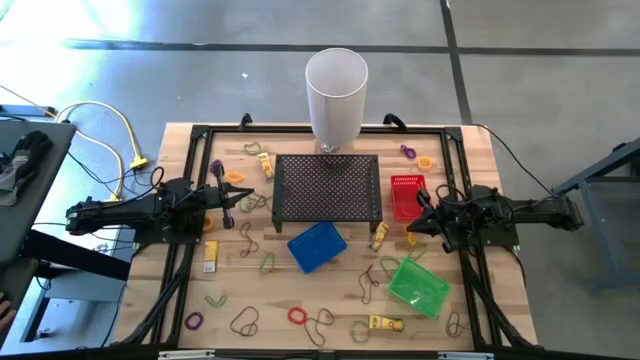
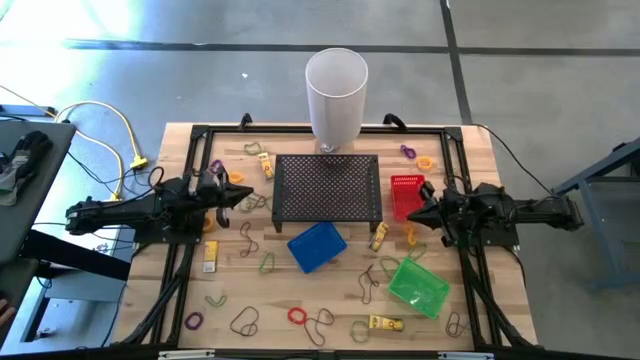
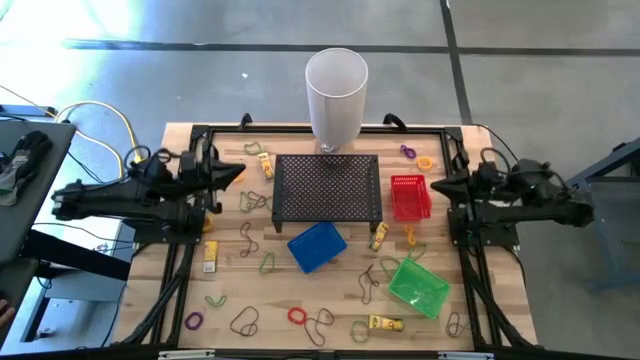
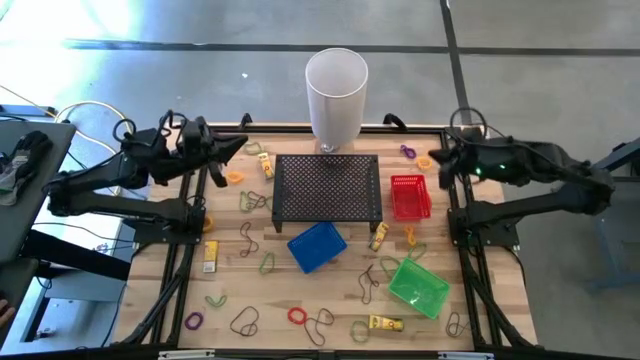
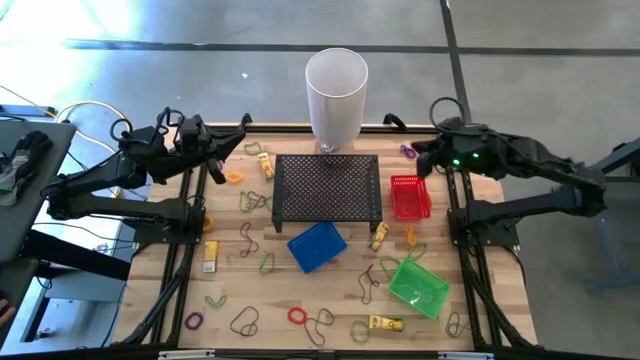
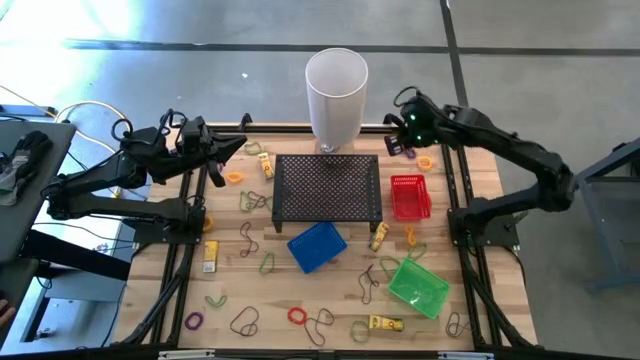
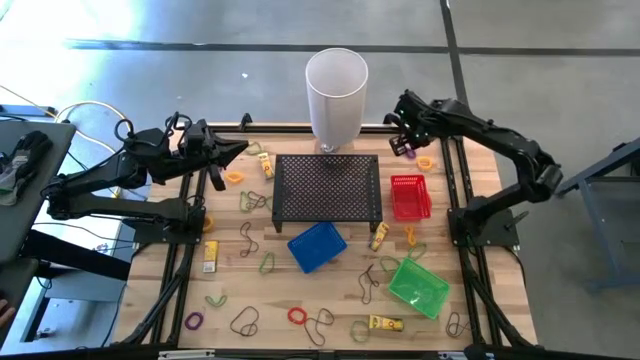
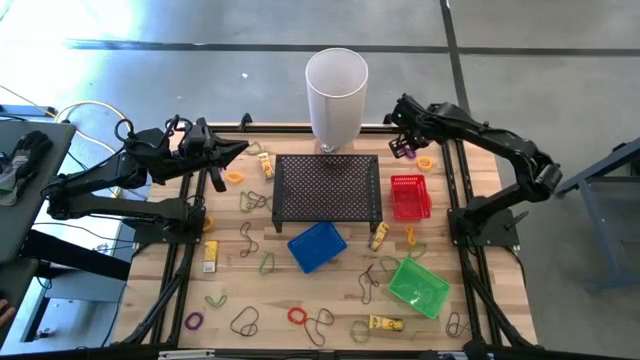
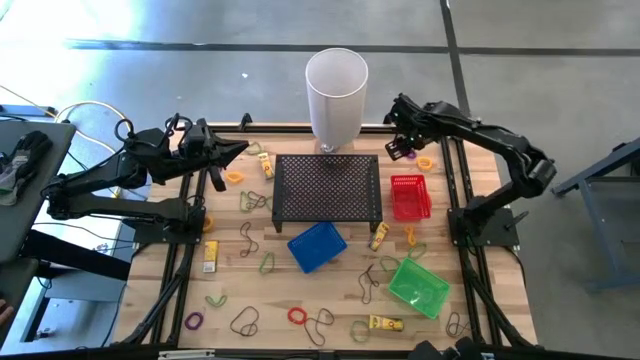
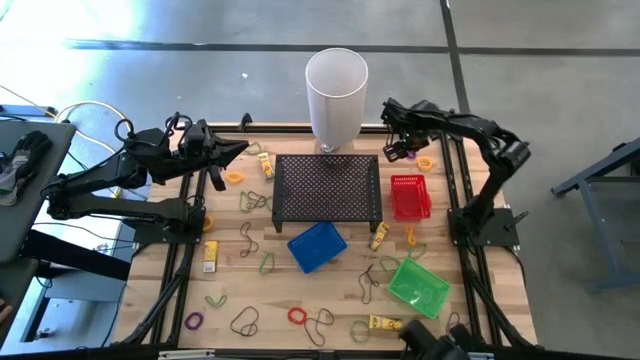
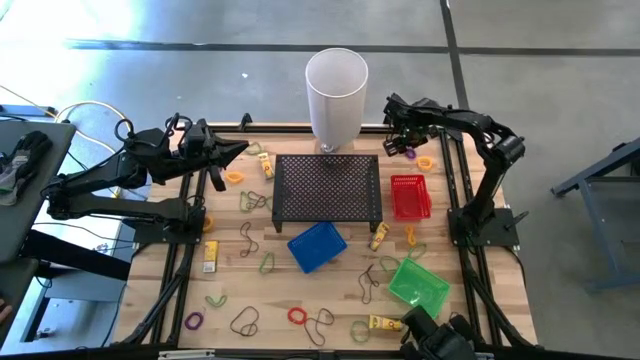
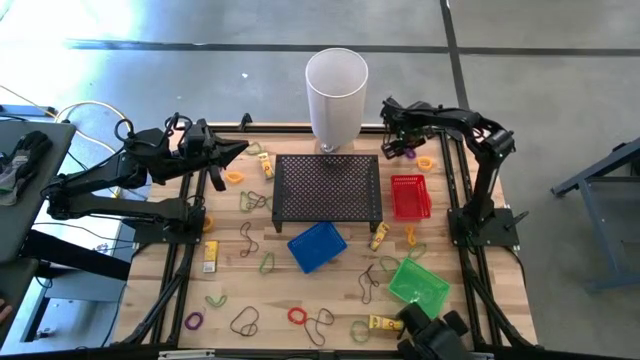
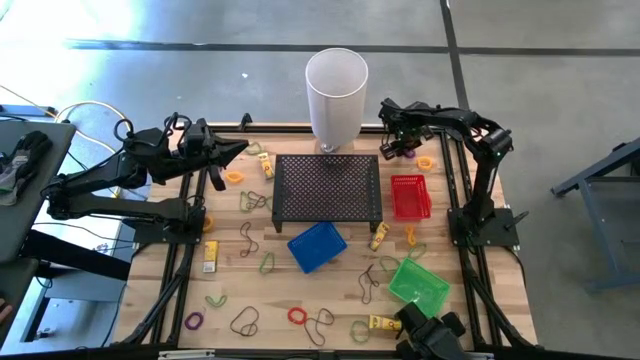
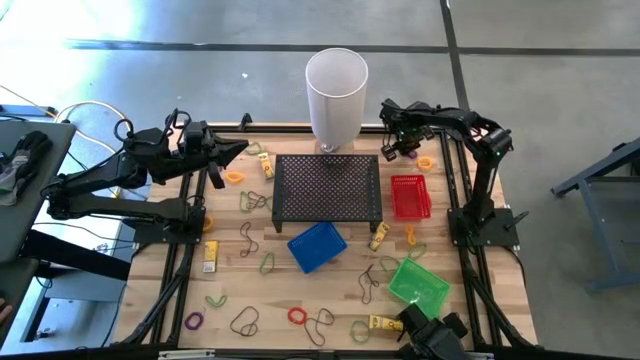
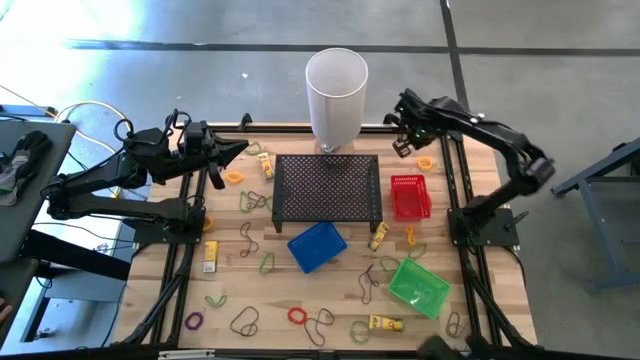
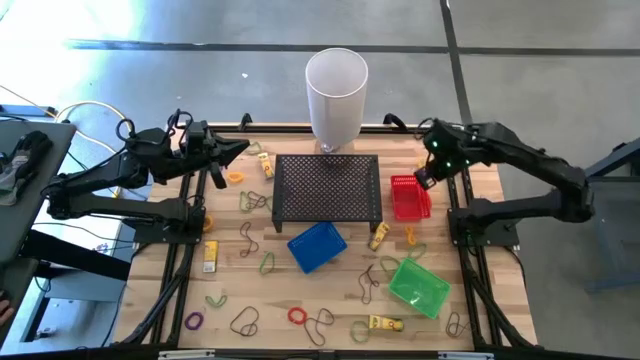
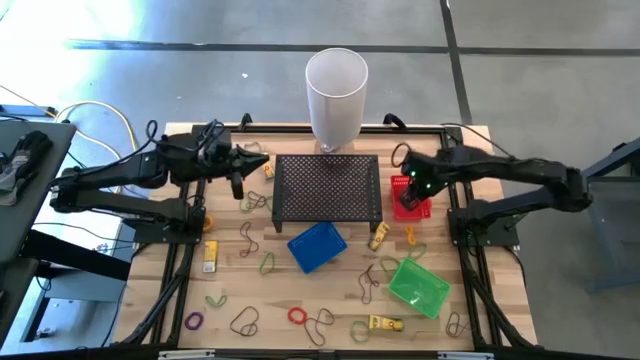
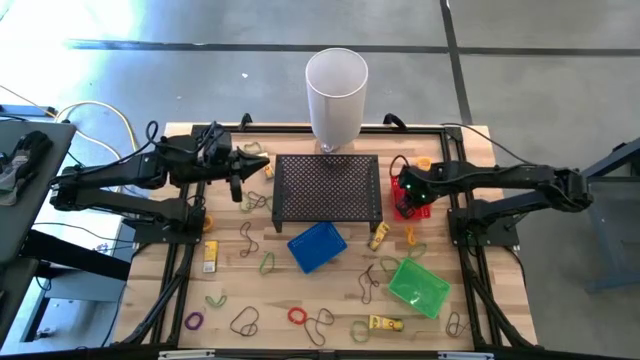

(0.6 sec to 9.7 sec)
Task: Pick & Place Office Desk Supplies
Put the violet spring keychain into the red bin

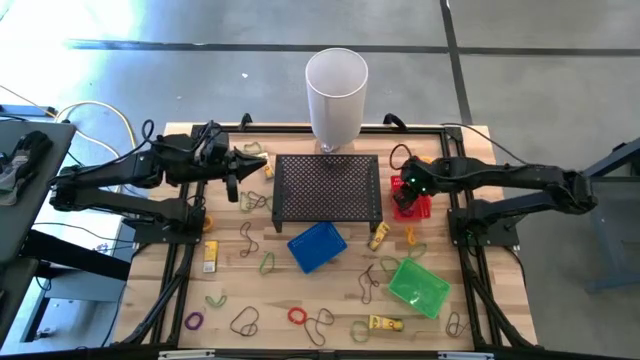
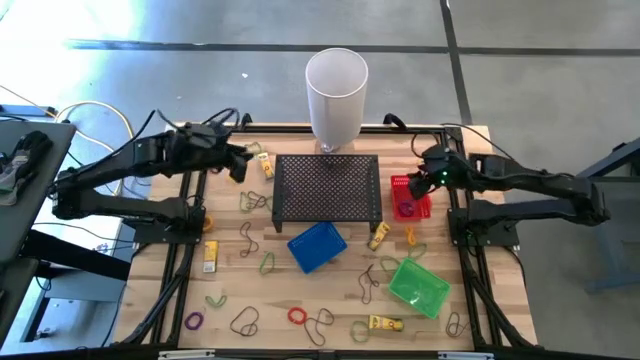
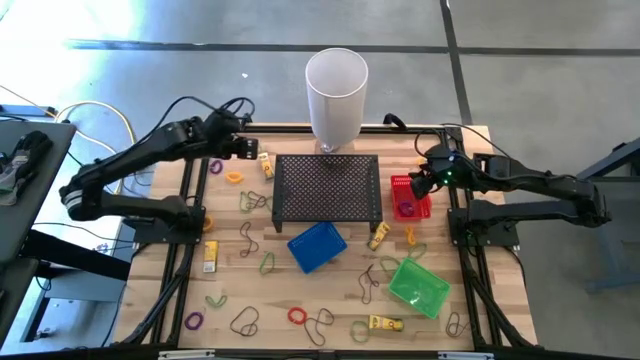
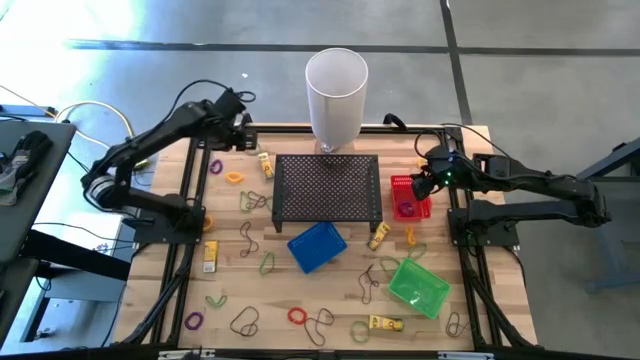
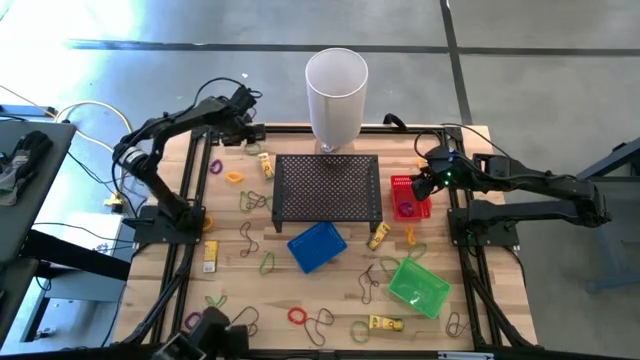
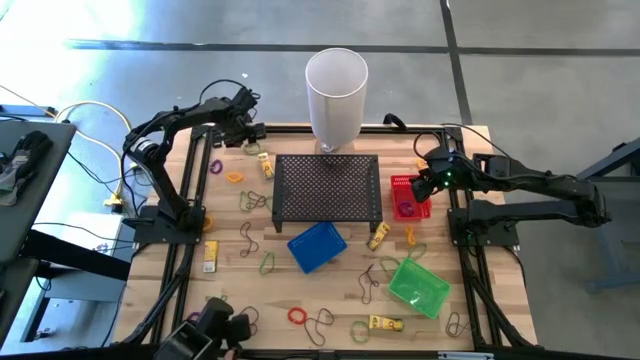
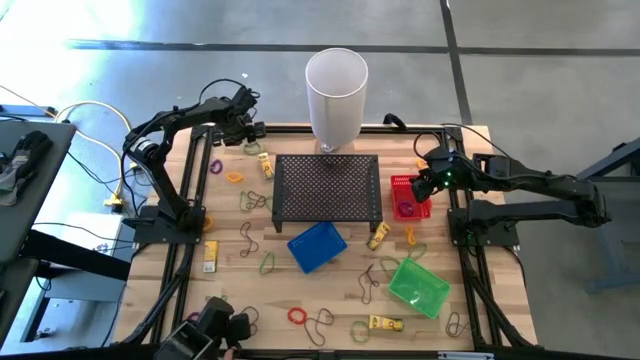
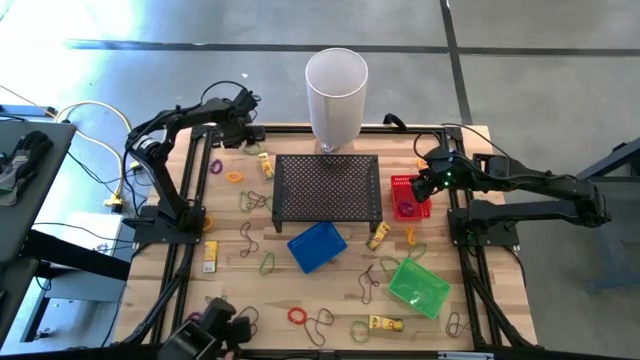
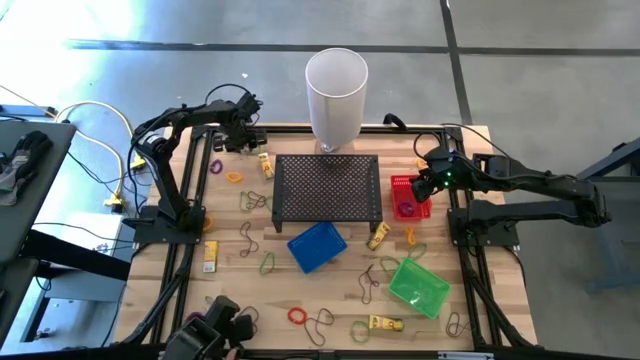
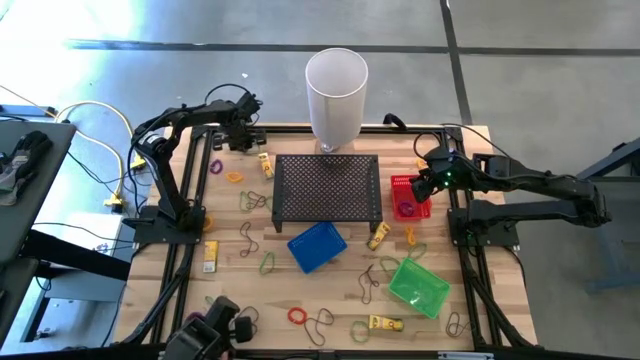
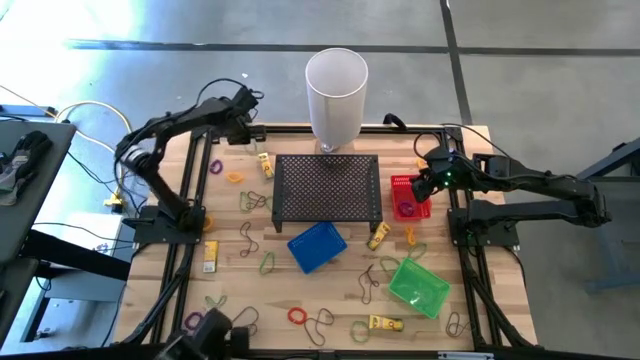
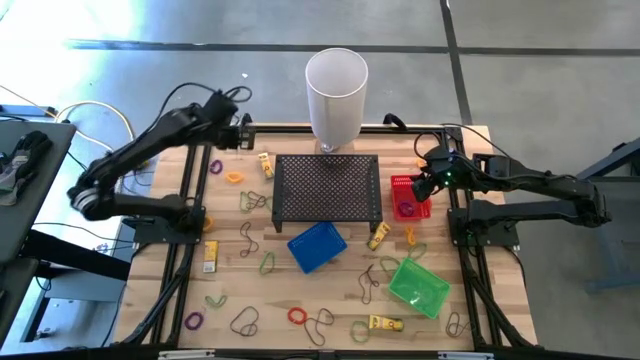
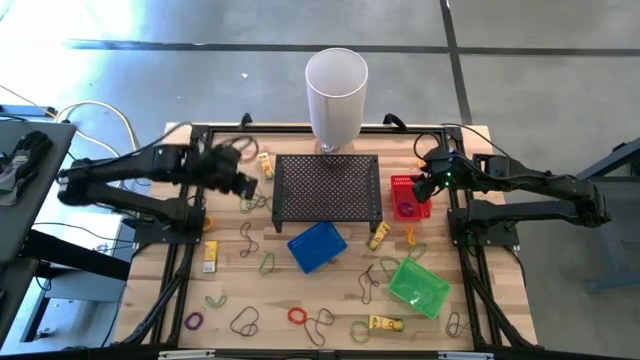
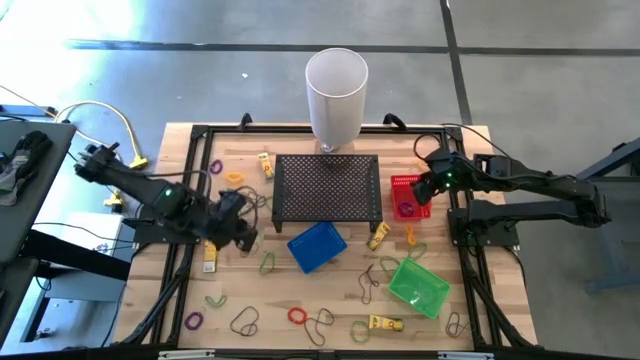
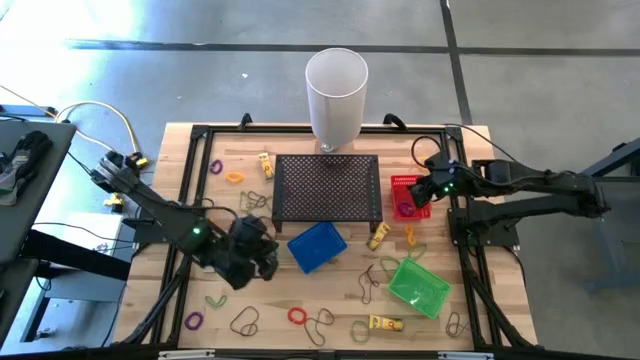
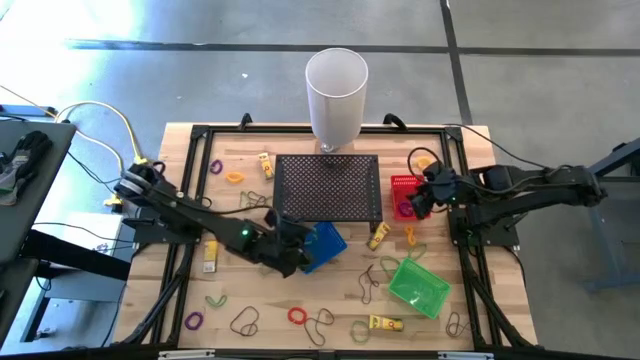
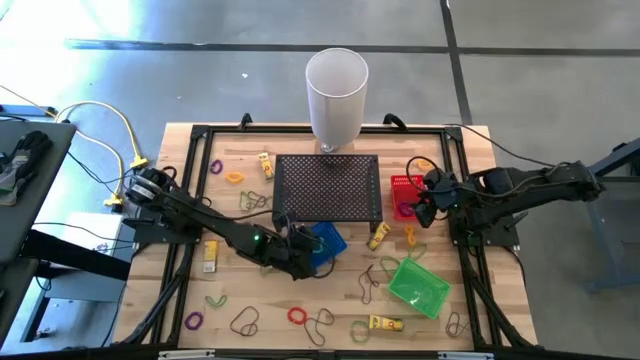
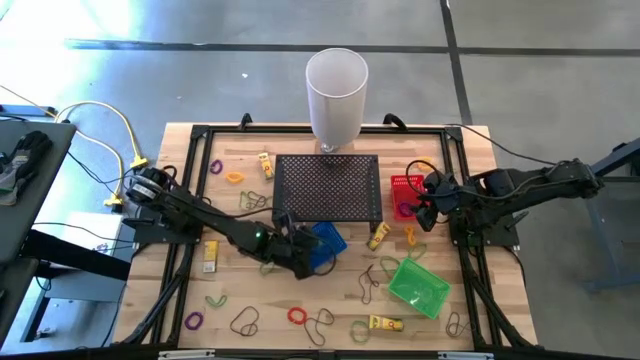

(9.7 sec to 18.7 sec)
Put the green rubber band into the blue bin

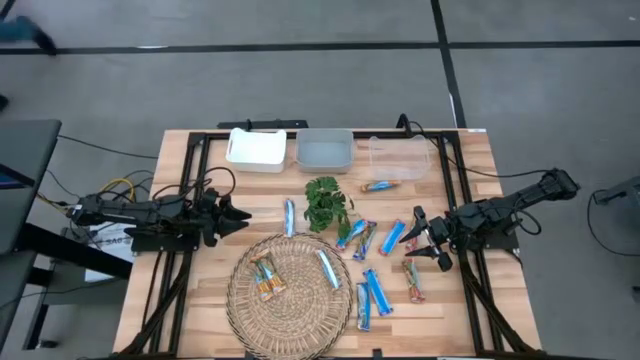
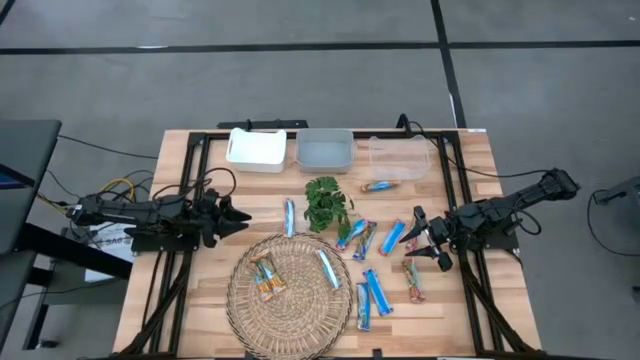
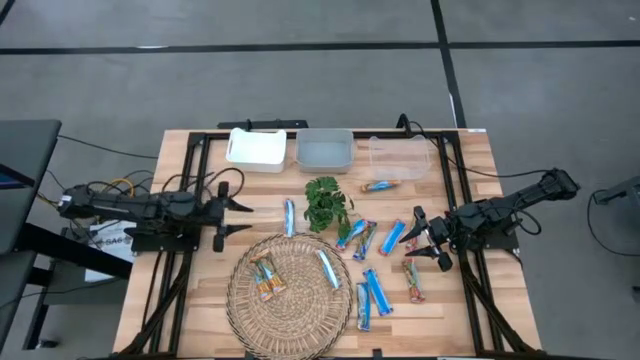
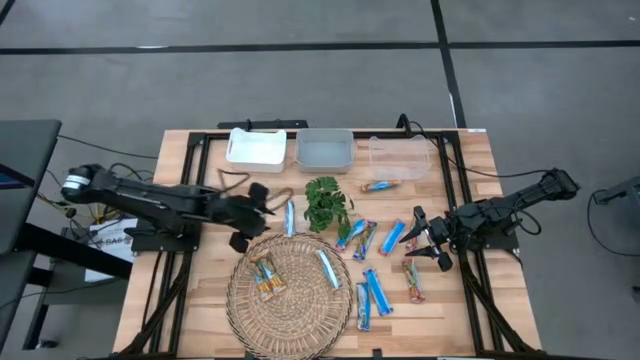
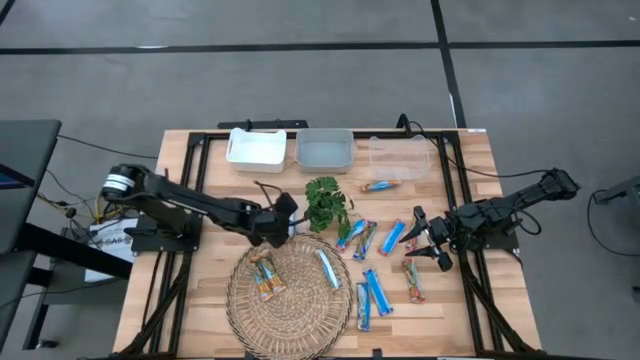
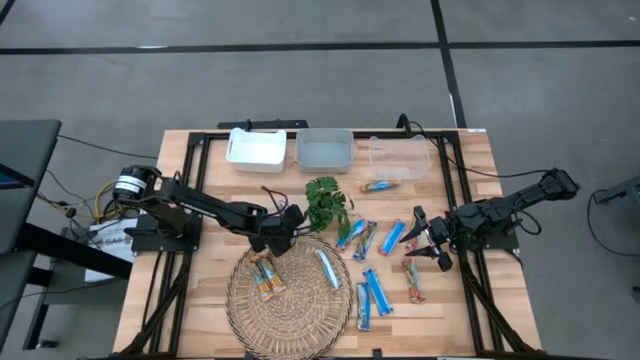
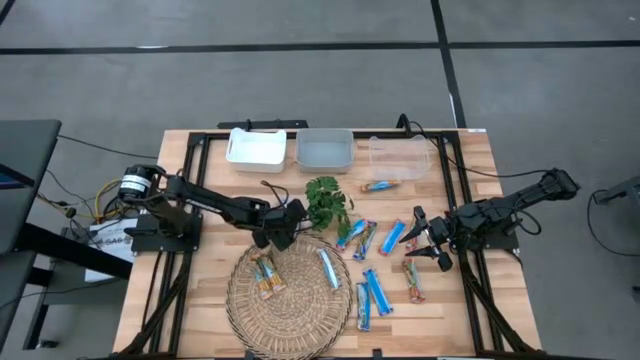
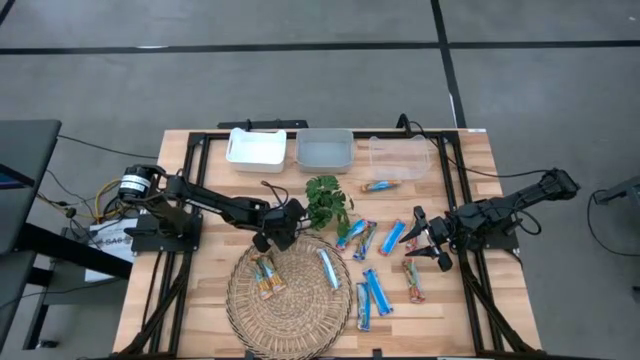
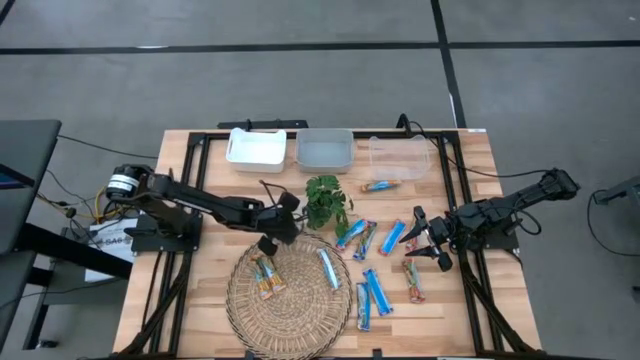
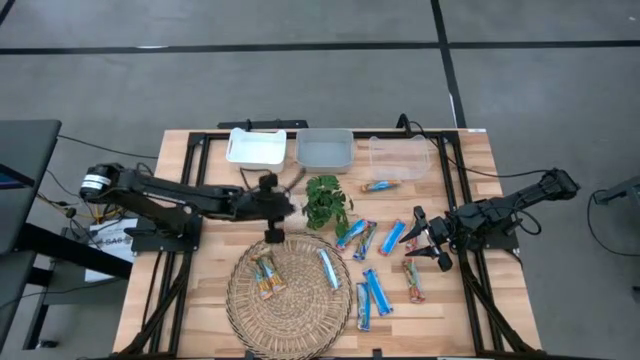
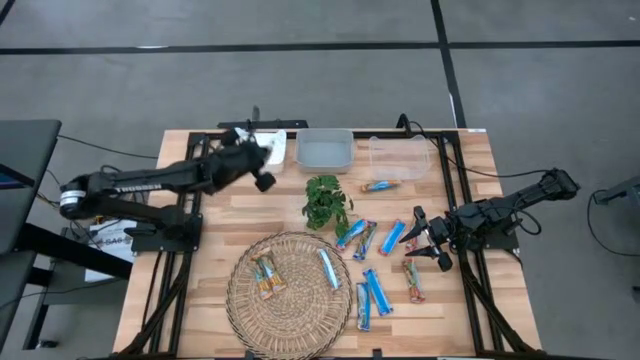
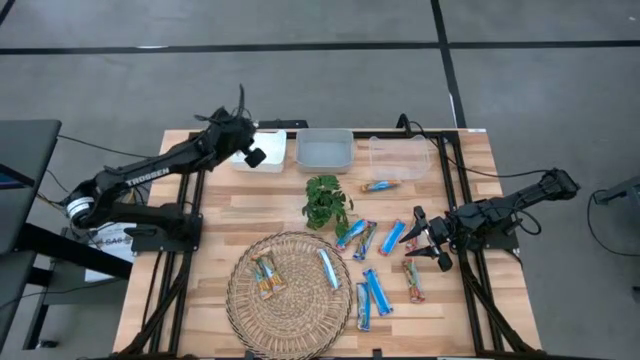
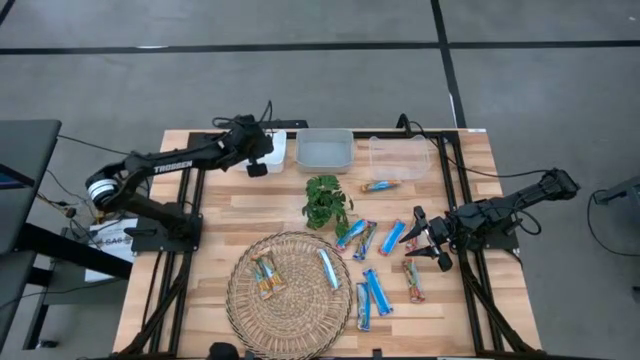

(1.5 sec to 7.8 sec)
Task: Pick and place Granola Bars by type
Put the yellow granola bar into the white bin
